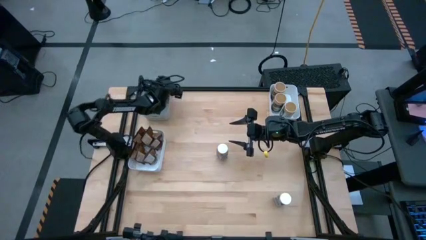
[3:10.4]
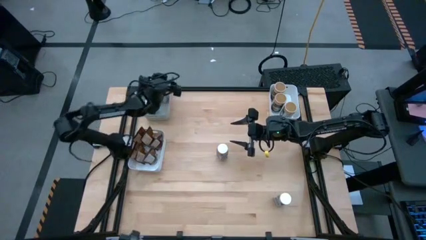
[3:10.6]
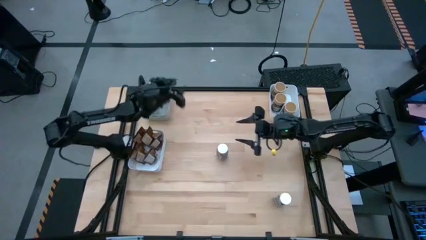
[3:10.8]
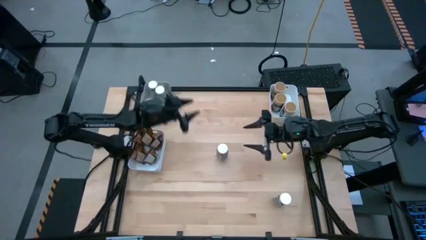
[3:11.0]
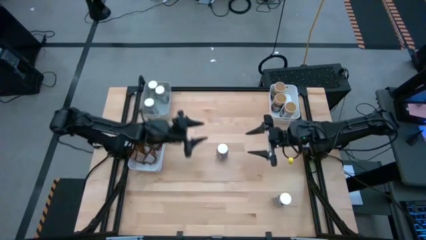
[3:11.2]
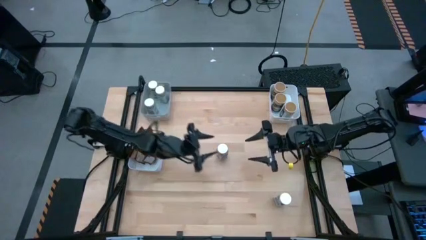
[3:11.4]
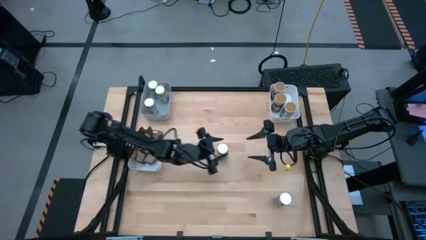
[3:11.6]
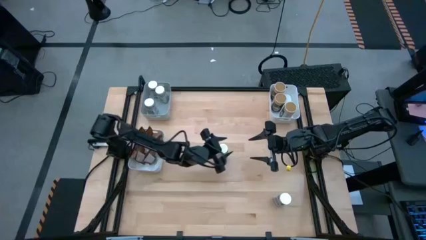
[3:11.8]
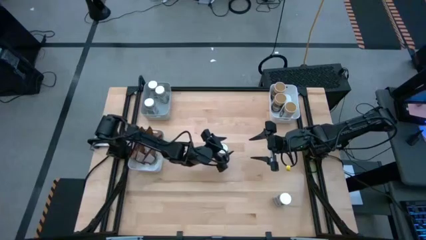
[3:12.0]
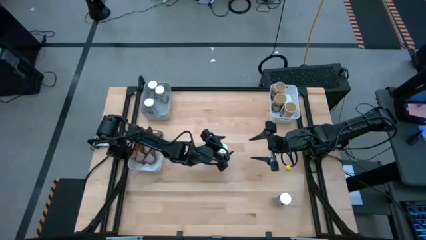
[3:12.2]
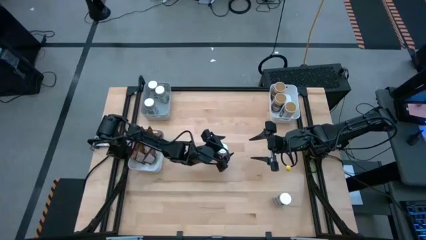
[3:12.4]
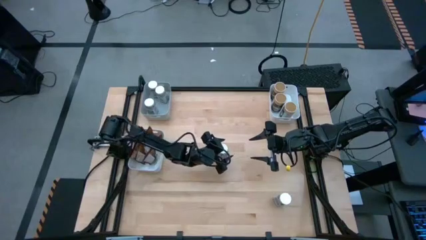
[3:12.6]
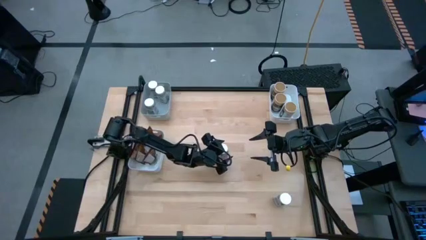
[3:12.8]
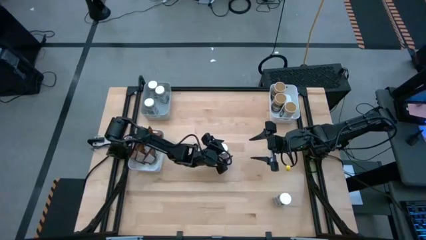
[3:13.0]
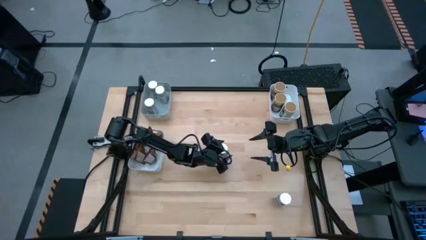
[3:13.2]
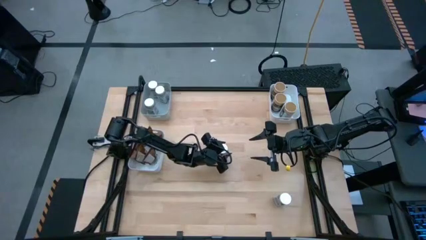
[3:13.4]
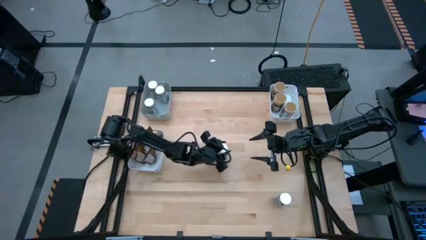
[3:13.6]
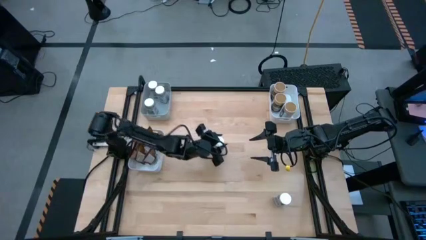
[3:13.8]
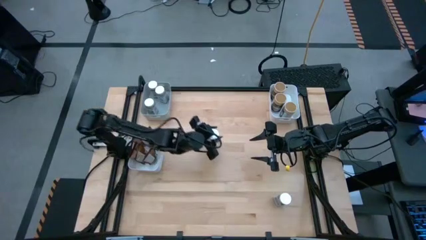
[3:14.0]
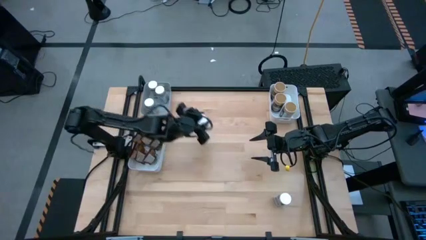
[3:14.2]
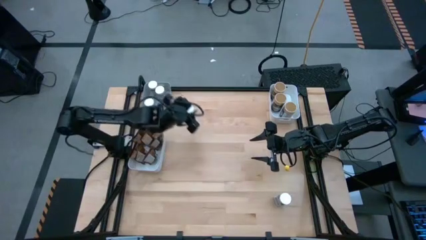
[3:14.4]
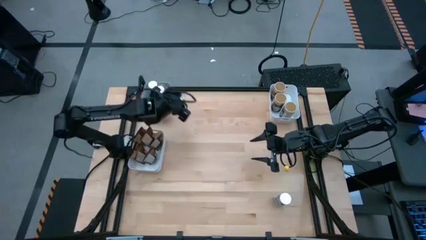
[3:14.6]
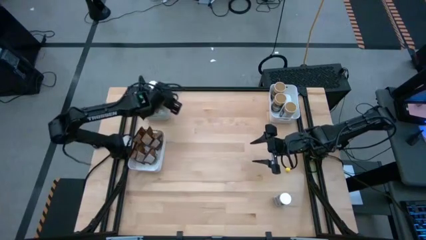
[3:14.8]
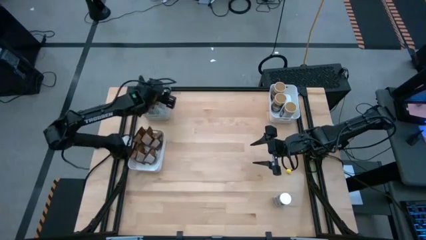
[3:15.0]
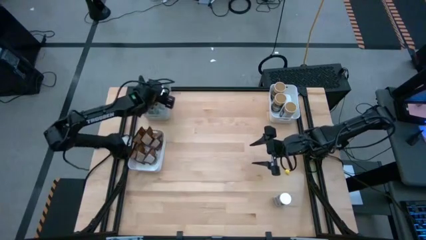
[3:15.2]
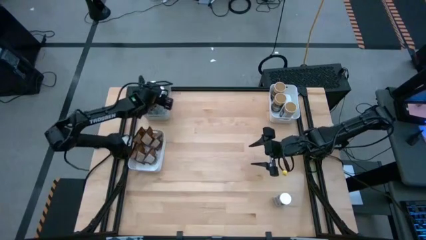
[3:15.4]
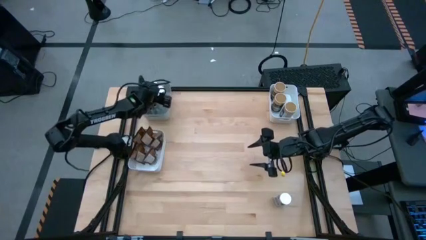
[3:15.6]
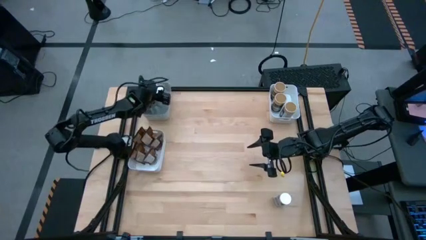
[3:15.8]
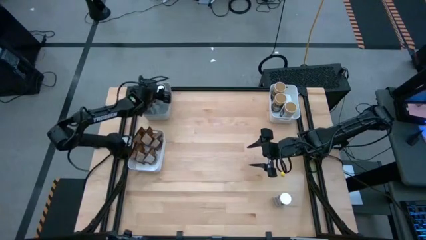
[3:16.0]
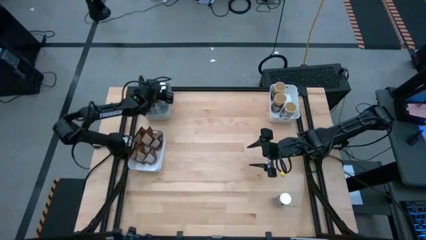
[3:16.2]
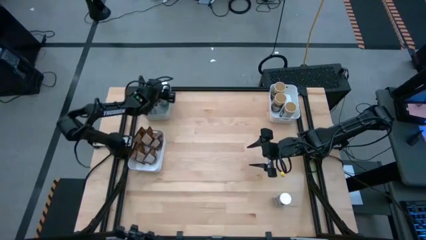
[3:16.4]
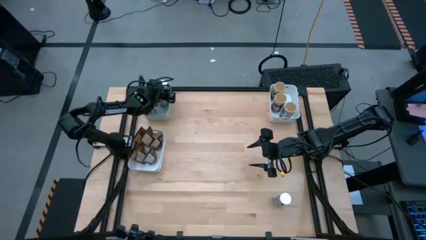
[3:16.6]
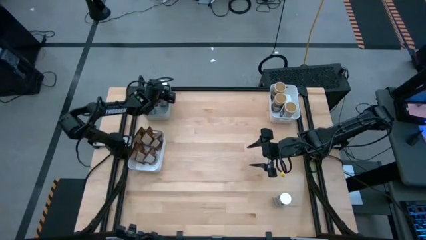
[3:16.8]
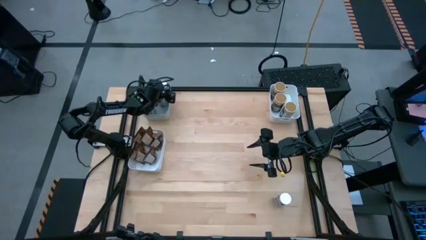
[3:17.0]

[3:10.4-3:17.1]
Task: Sort spices by type
Put the white seasoning bottle into the gray bin

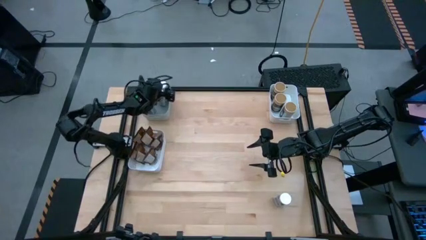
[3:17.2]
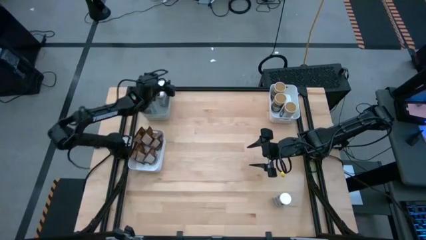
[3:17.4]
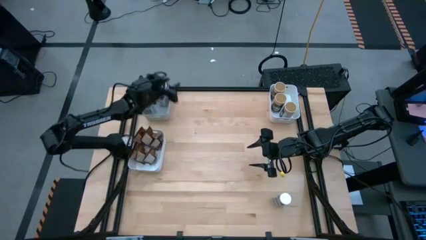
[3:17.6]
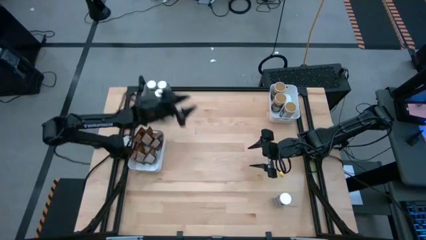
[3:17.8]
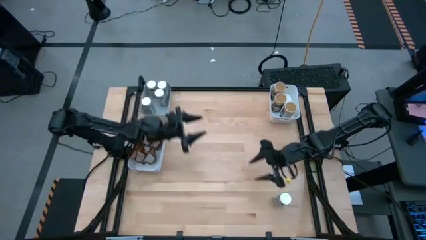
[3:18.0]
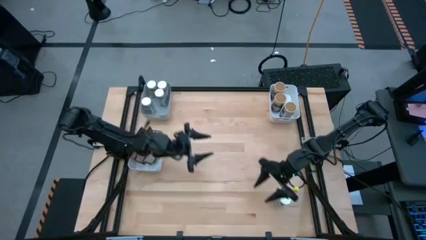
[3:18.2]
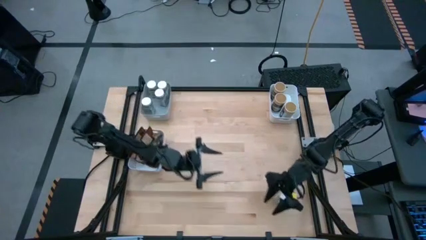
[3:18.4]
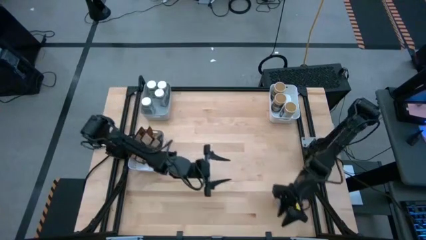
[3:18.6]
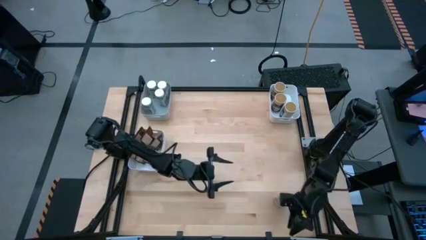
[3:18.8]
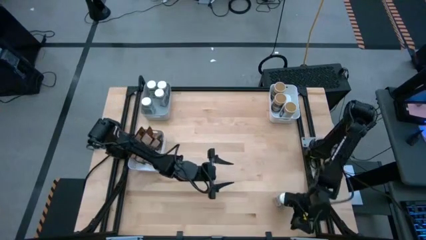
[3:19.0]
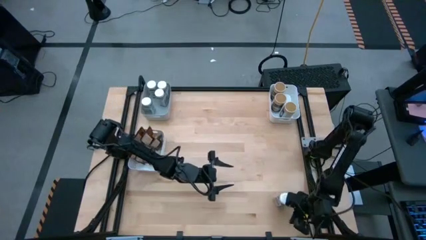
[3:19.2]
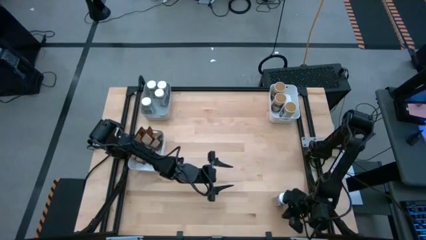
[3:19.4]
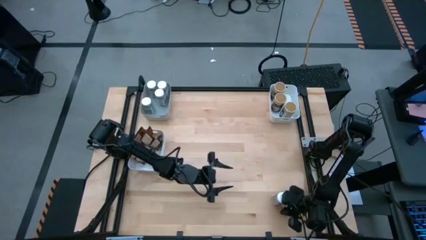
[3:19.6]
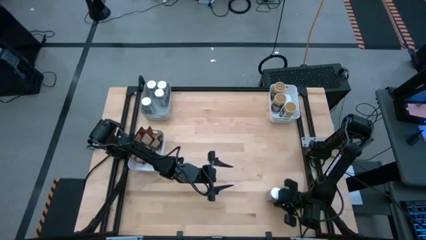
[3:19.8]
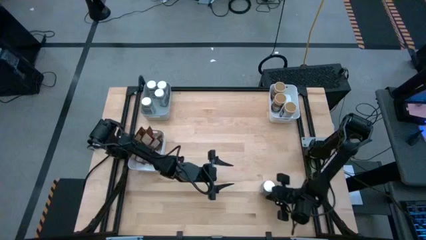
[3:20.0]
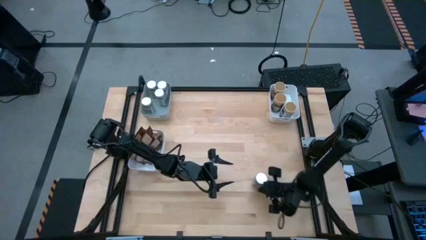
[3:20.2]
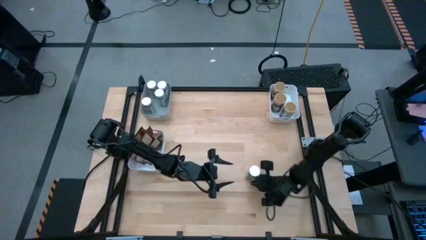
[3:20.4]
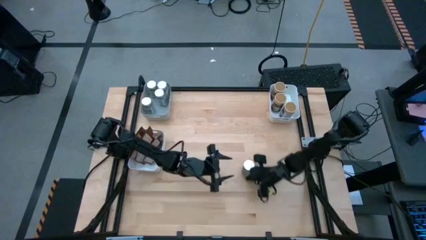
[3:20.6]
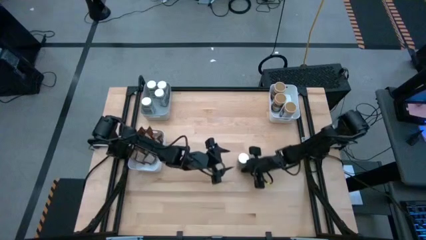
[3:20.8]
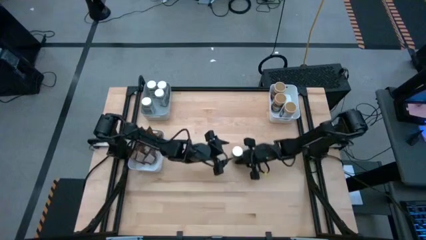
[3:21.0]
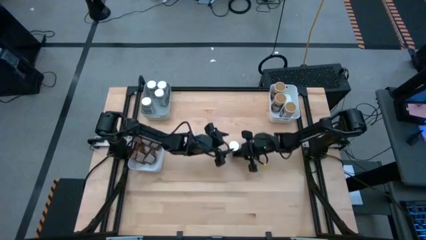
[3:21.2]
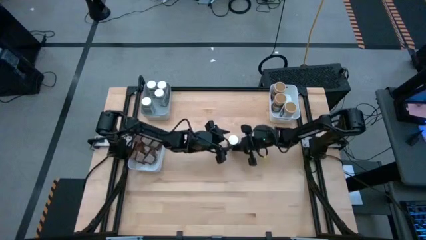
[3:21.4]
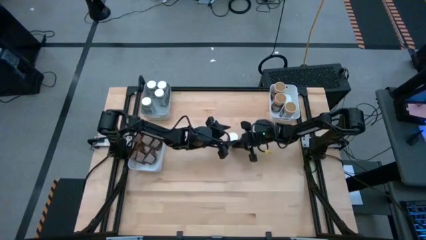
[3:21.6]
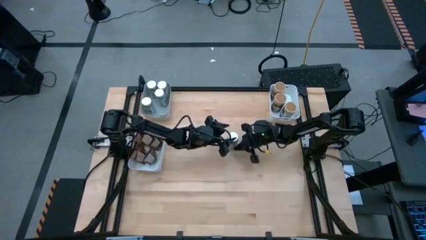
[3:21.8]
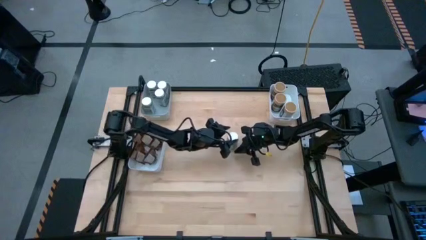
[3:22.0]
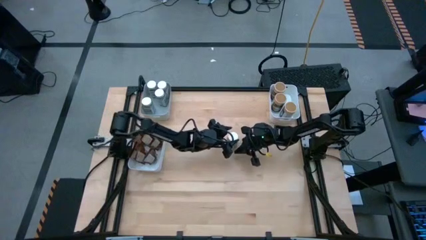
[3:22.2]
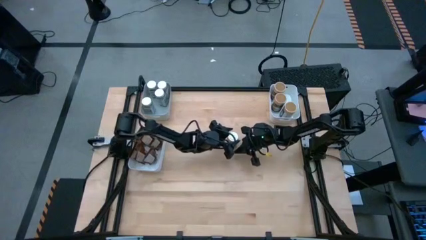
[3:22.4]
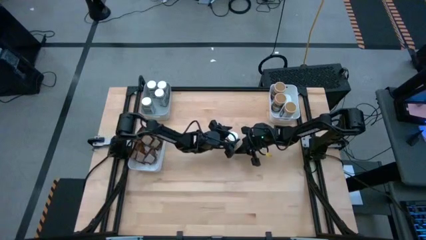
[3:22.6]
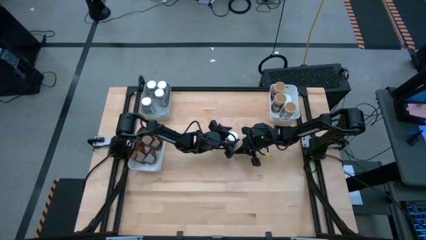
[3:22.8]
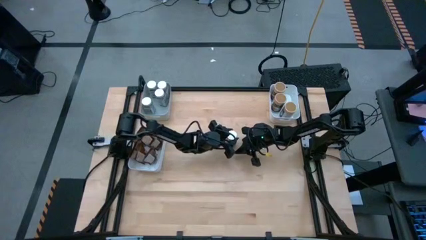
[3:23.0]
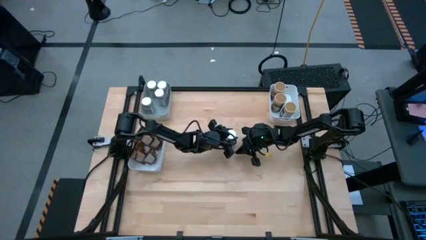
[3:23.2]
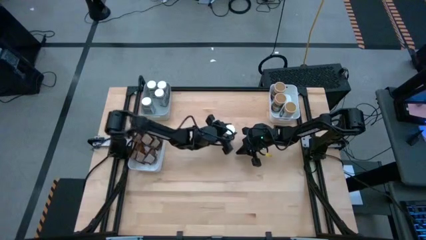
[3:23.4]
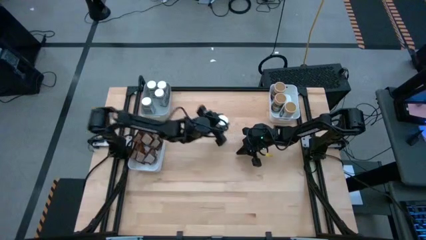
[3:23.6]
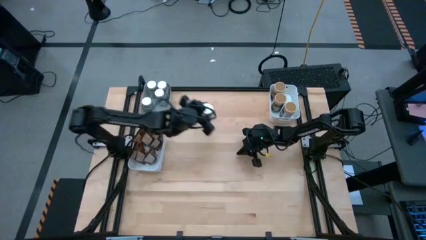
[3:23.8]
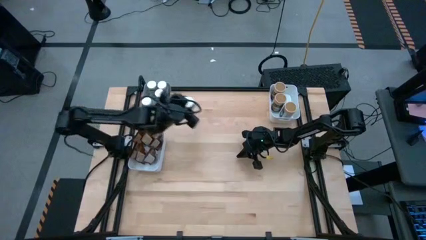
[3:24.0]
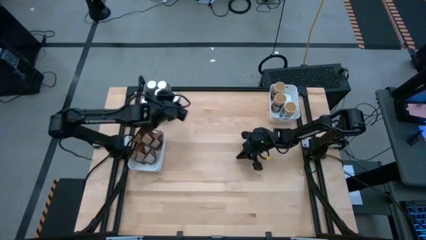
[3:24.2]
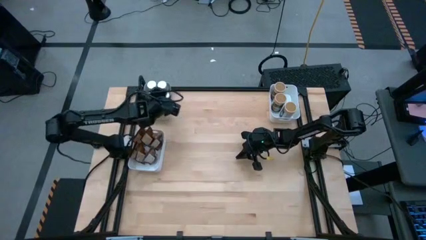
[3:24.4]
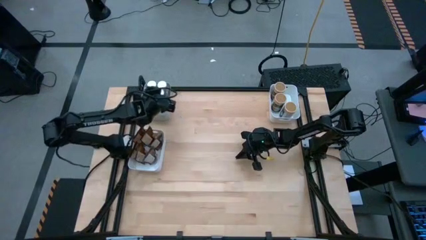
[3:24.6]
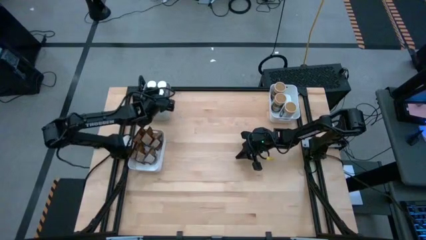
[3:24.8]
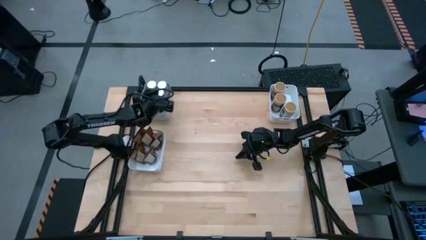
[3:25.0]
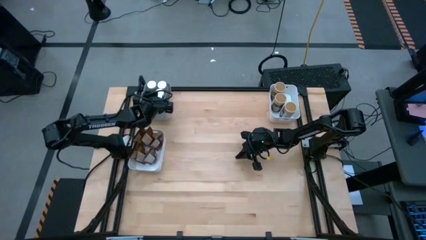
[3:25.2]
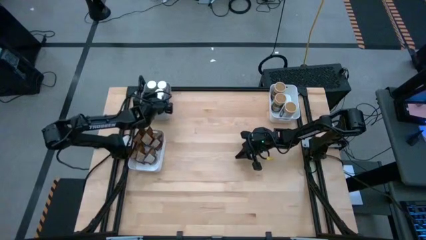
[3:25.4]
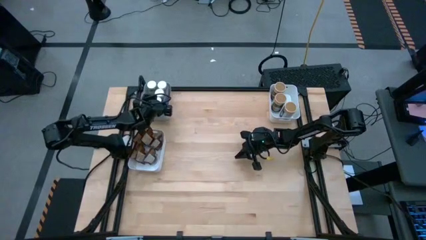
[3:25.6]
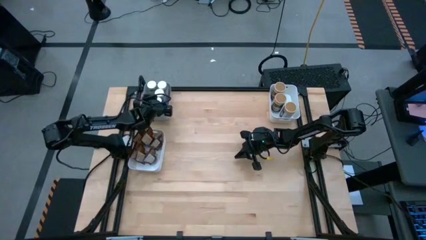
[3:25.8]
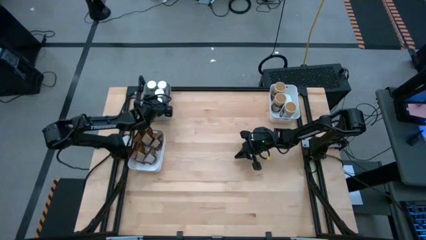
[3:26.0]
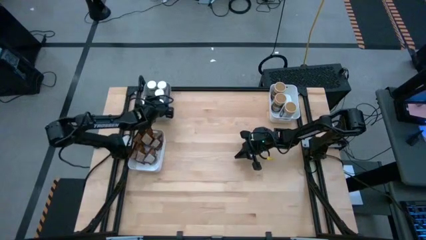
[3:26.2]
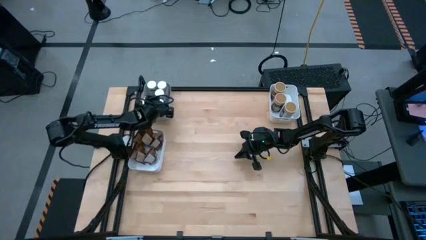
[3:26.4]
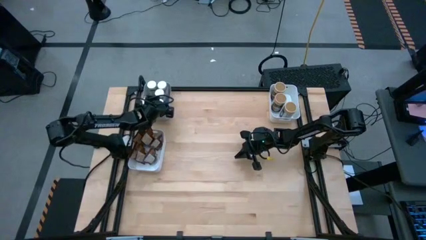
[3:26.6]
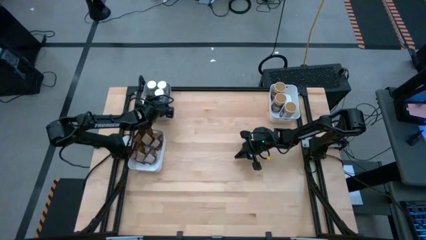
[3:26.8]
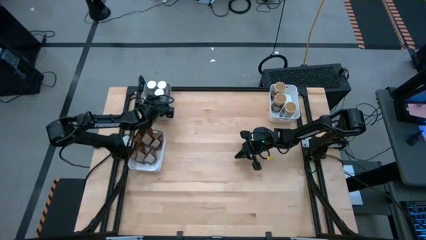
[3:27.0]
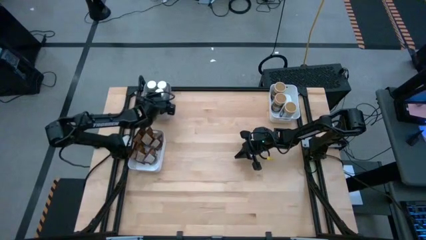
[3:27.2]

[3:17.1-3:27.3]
Put the white seasoning bottle into the gray bin
